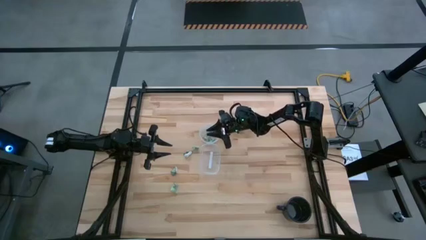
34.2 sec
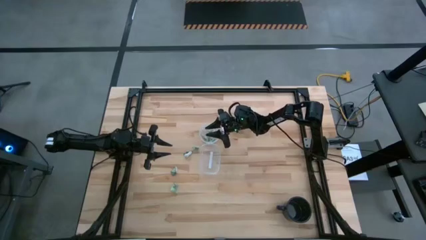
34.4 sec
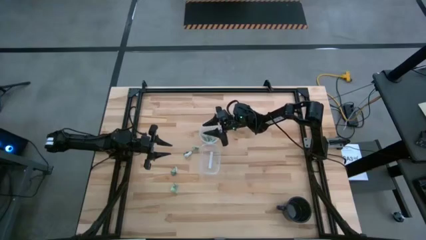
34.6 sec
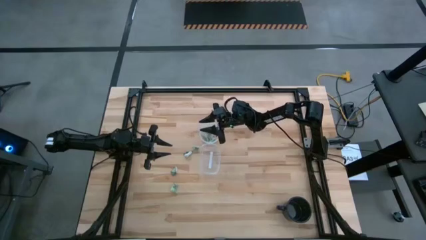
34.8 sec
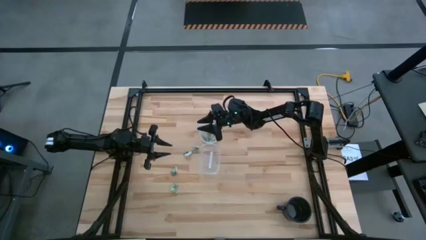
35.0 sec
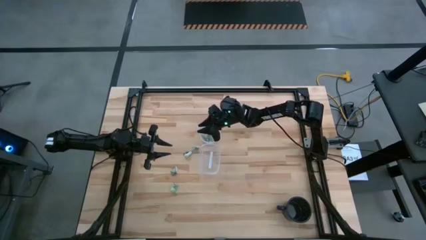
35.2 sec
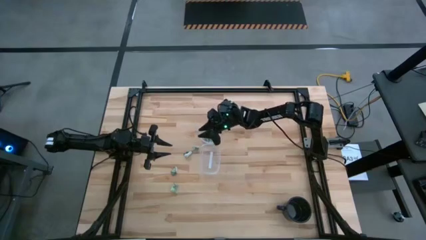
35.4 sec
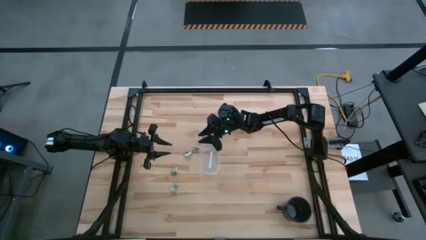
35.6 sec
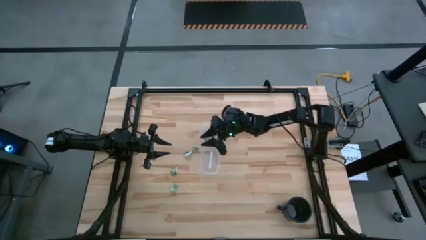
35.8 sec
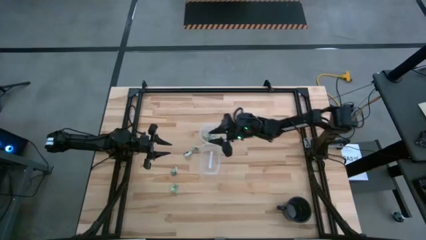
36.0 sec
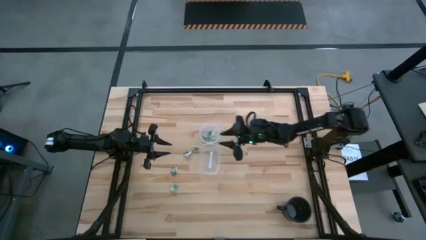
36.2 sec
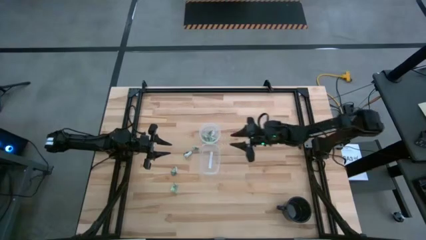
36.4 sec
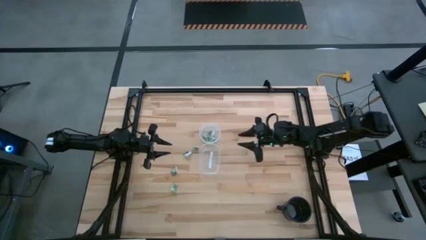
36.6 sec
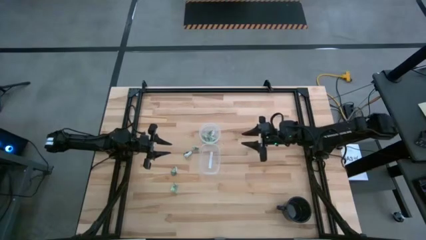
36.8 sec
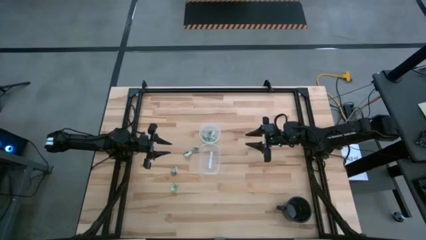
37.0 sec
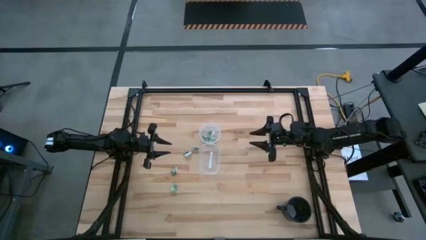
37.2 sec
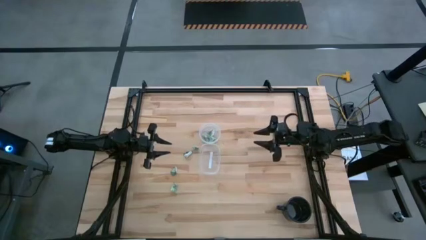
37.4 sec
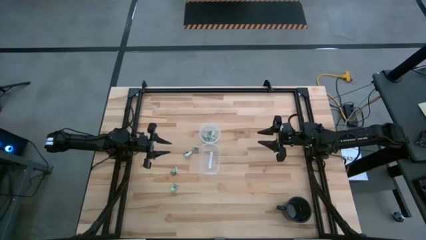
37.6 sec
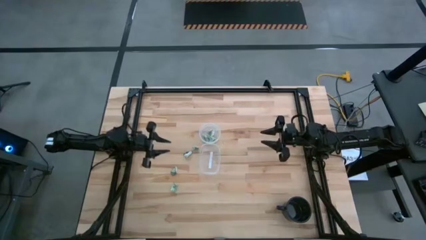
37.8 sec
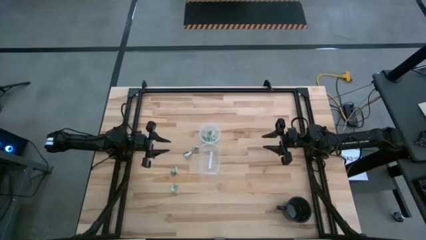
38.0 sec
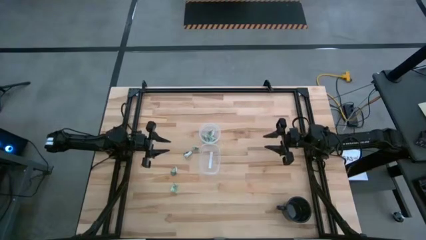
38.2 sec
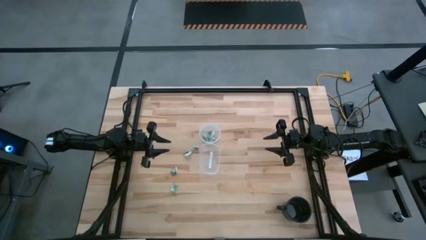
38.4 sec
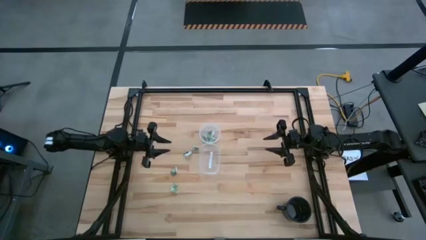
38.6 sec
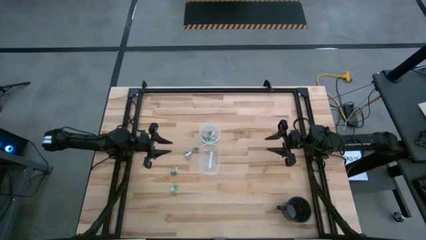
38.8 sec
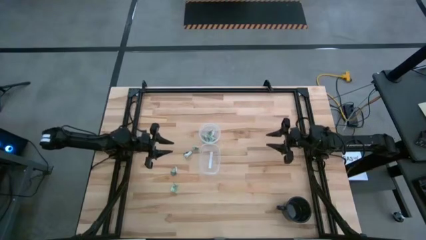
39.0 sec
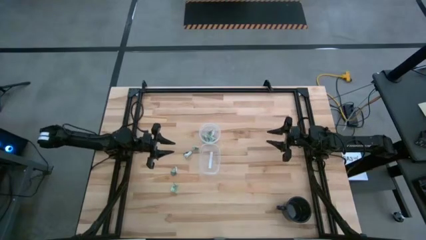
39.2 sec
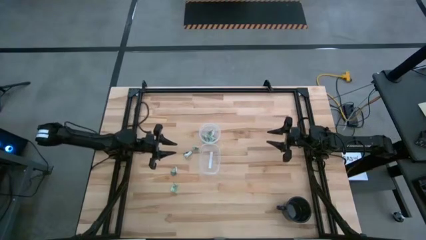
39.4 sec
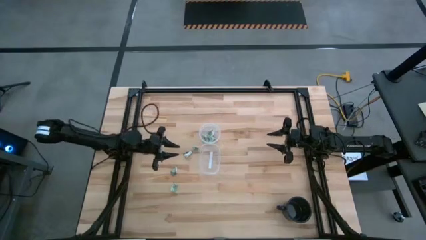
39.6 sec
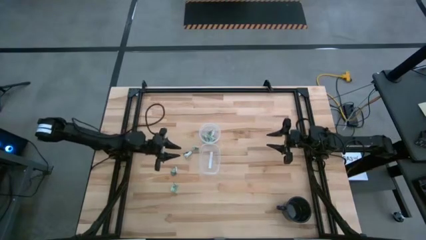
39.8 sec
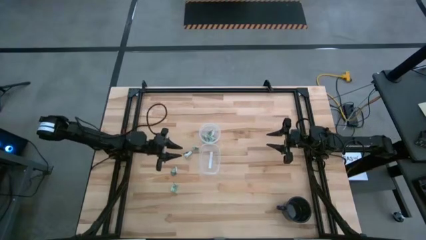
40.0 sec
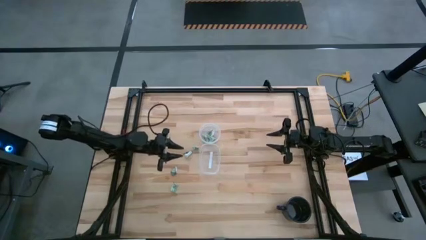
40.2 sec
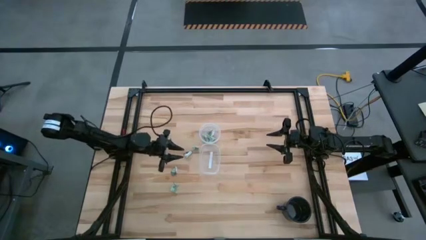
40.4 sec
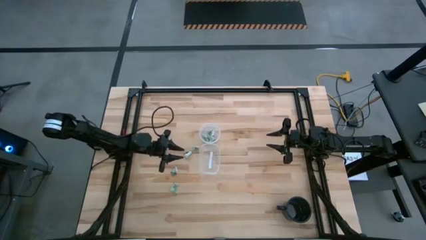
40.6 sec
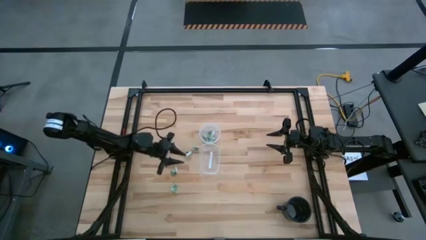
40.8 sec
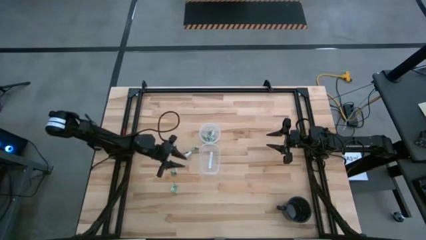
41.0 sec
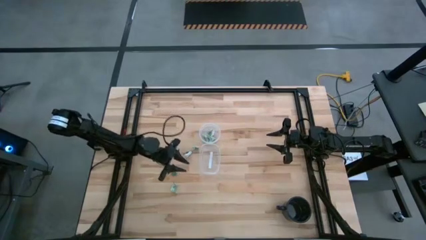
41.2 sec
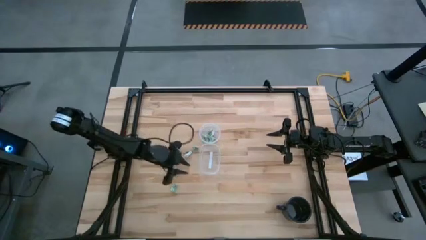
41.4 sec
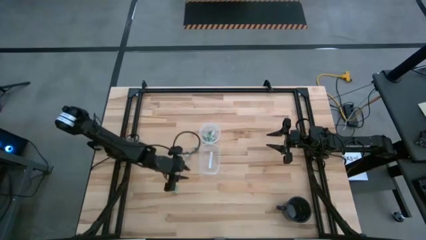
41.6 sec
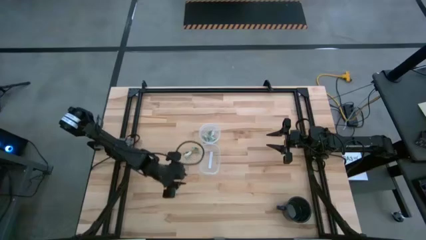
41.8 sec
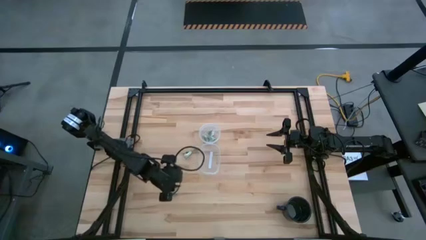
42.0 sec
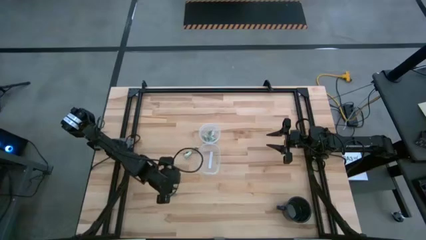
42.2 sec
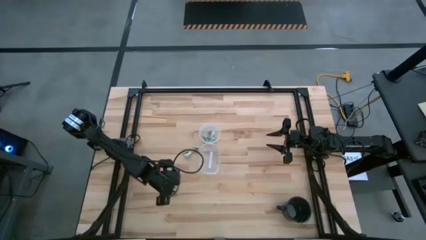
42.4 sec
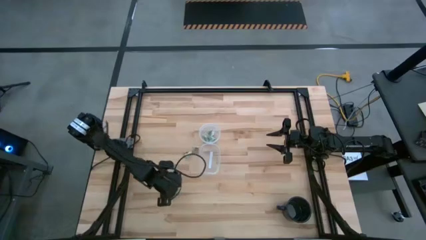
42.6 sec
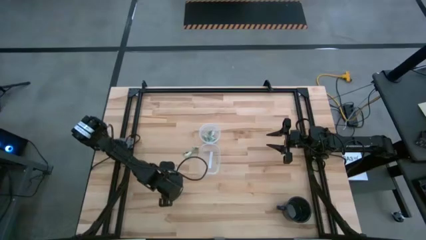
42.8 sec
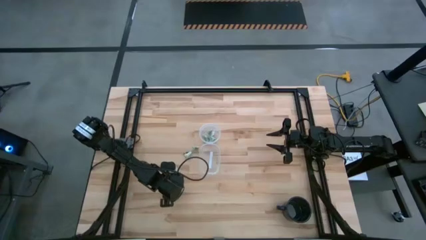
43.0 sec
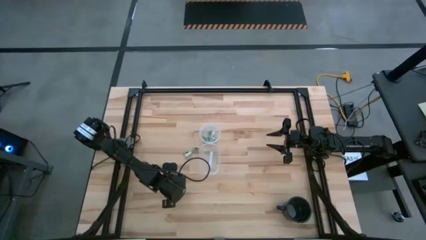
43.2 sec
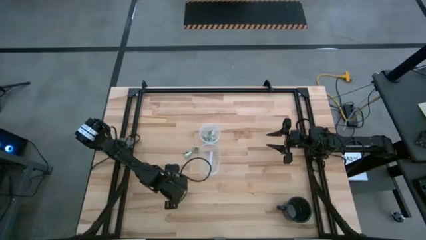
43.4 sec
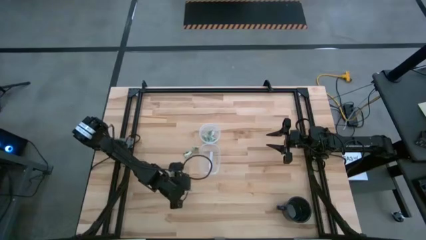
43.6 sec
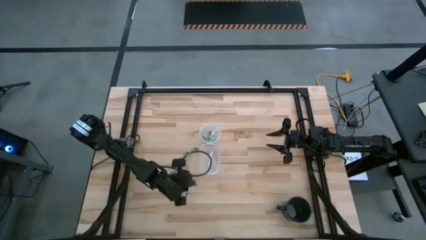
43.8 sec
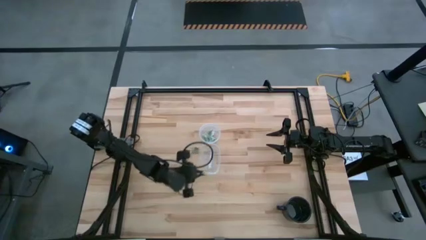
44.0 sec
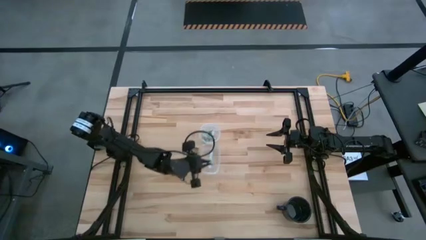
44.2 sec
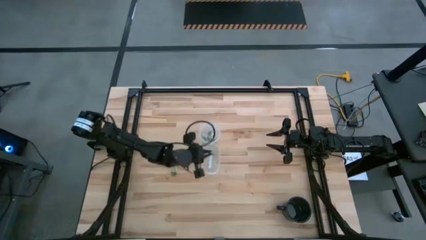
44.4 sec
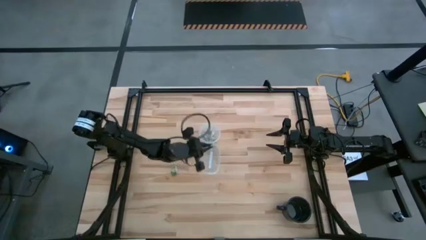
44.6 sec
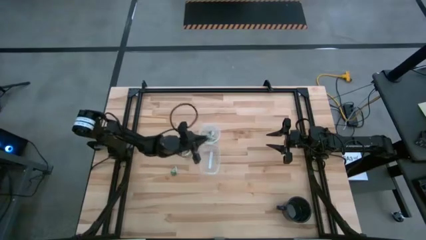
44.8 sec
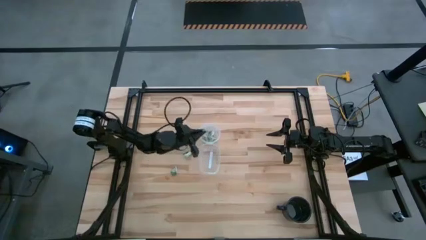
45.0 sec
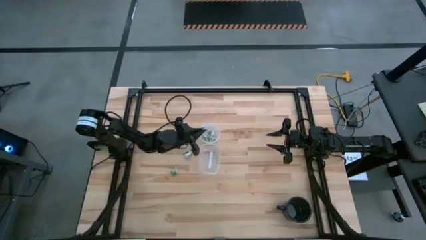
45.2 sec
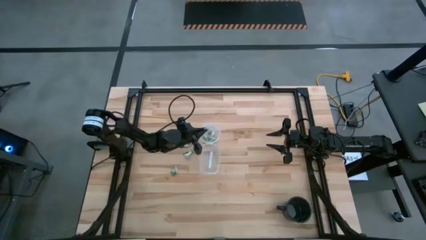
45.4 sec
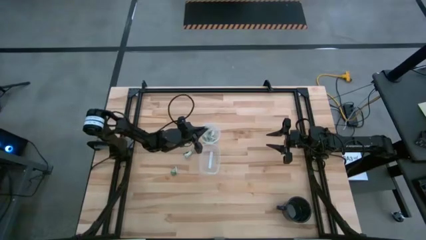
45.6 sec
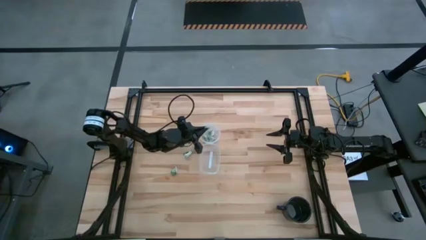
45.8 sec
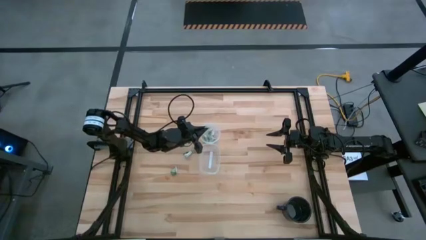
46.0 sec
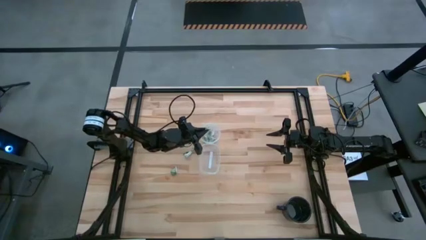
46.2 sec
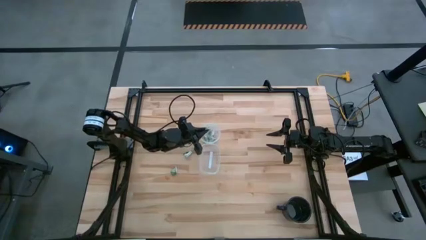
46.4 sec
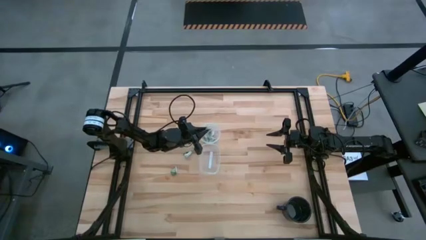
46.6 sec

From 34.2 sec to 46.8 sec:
Task: Pick and place items into bin
Put the stevia packet into the circular transparent bin
